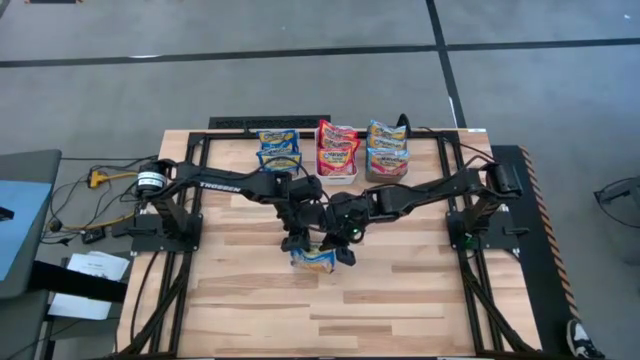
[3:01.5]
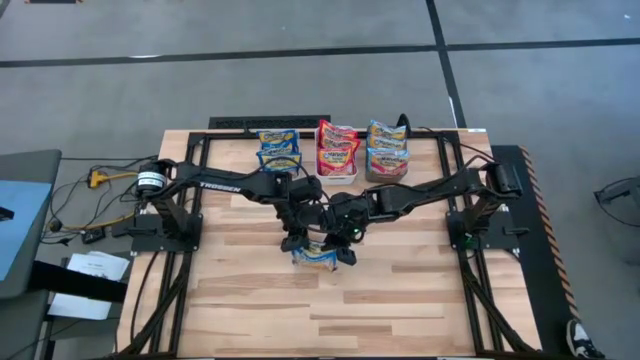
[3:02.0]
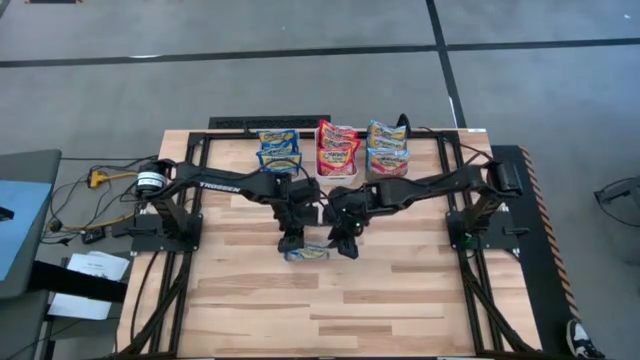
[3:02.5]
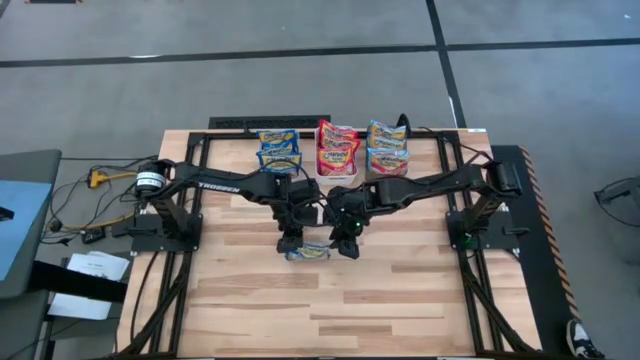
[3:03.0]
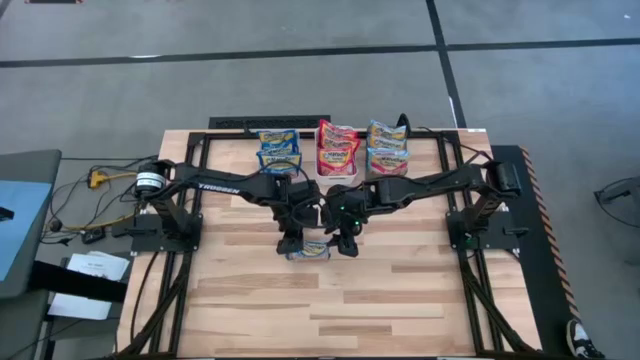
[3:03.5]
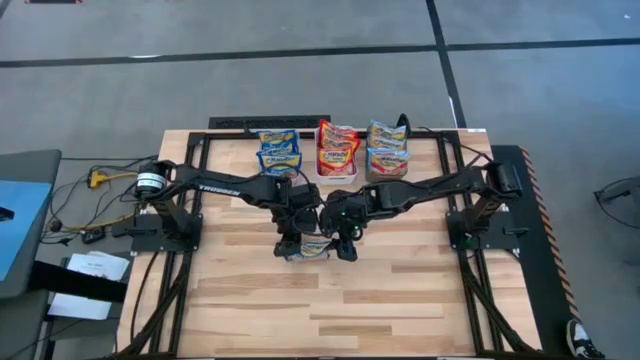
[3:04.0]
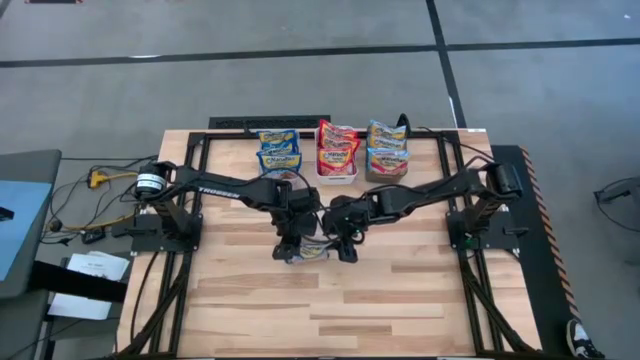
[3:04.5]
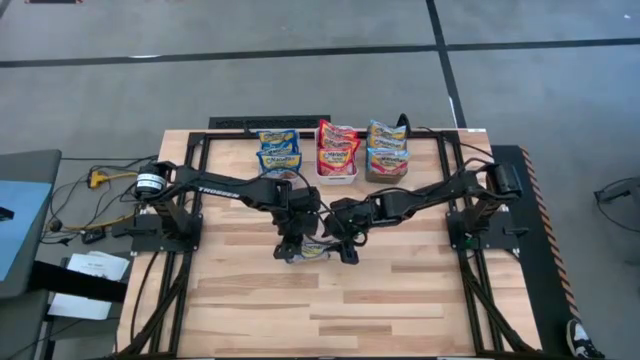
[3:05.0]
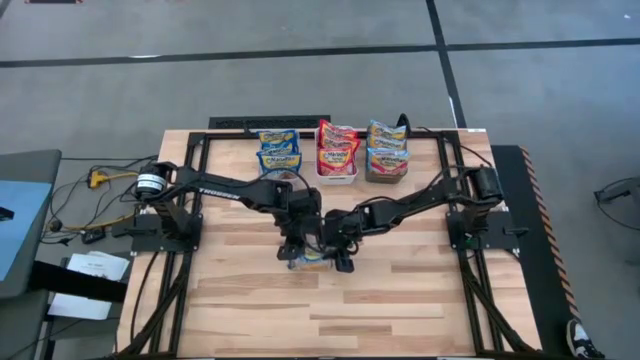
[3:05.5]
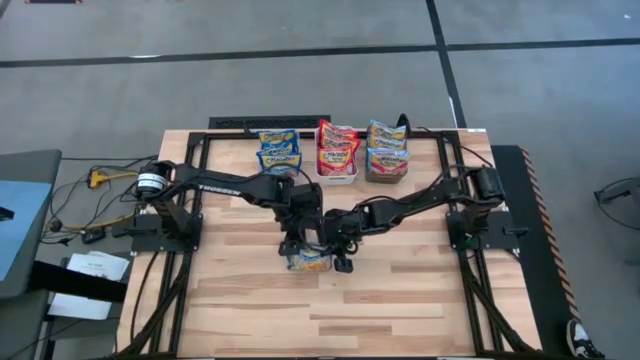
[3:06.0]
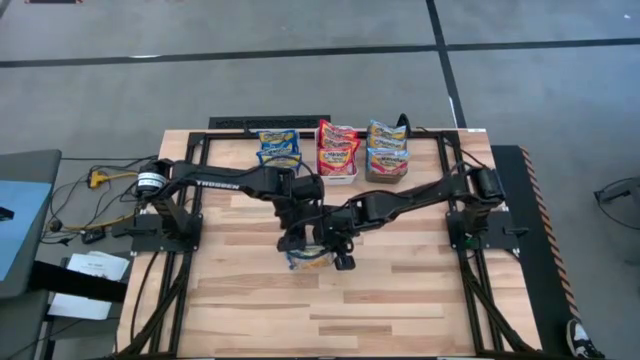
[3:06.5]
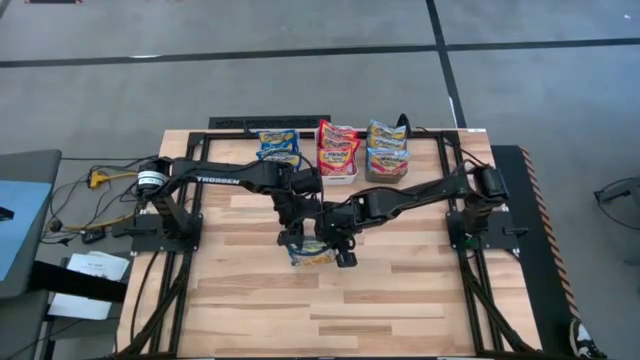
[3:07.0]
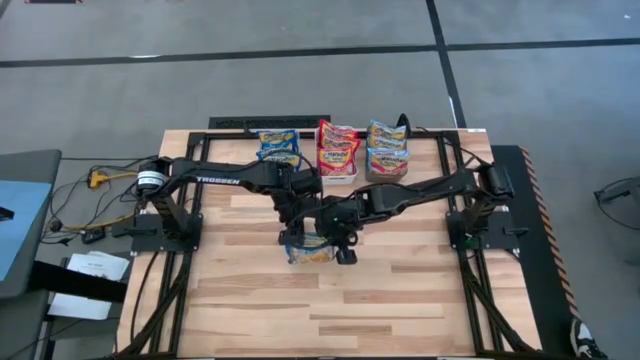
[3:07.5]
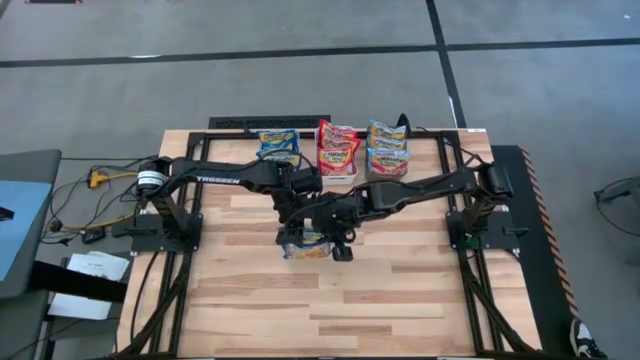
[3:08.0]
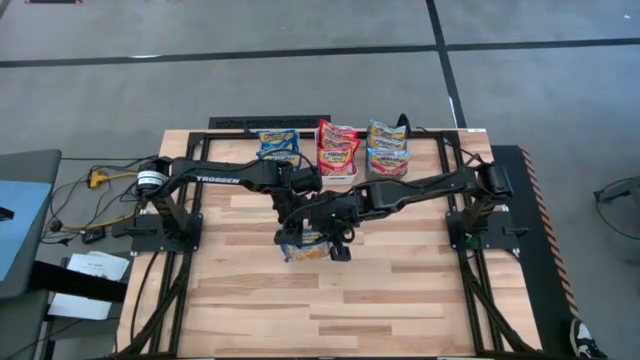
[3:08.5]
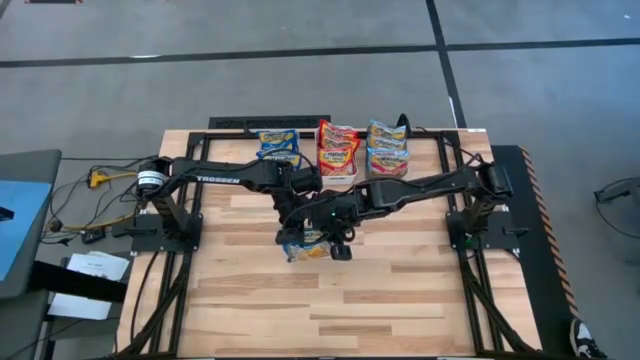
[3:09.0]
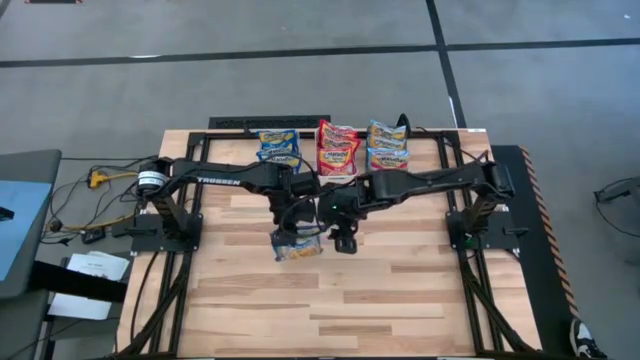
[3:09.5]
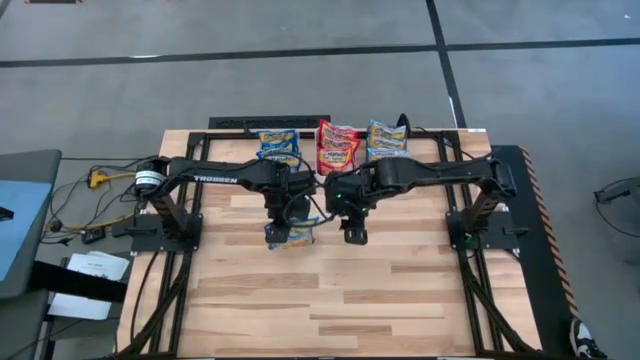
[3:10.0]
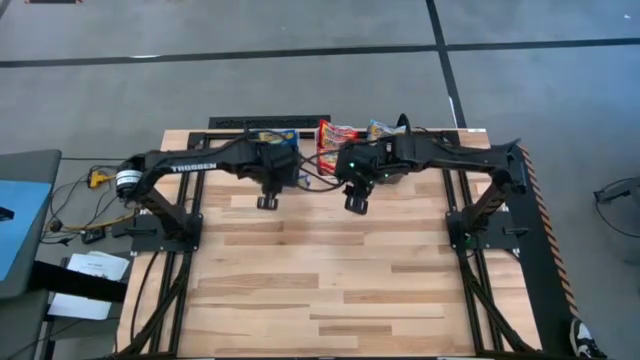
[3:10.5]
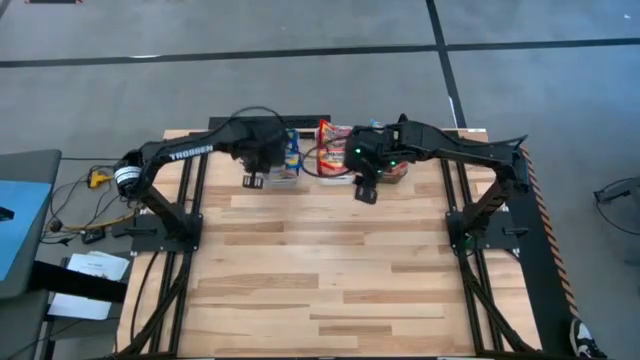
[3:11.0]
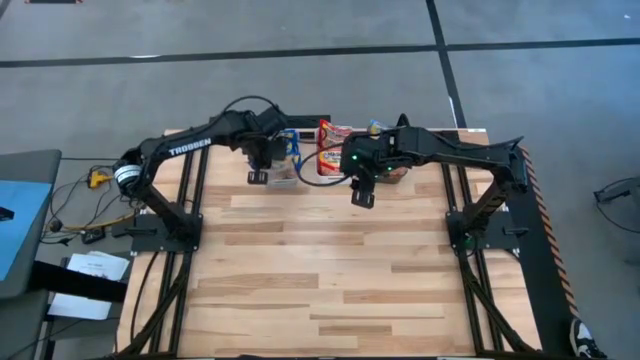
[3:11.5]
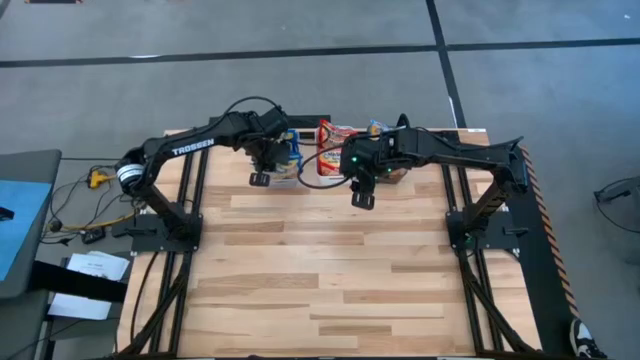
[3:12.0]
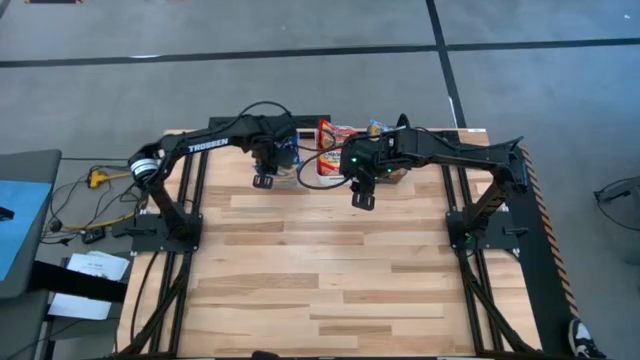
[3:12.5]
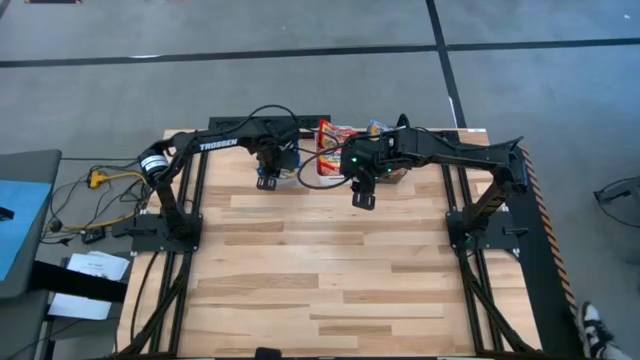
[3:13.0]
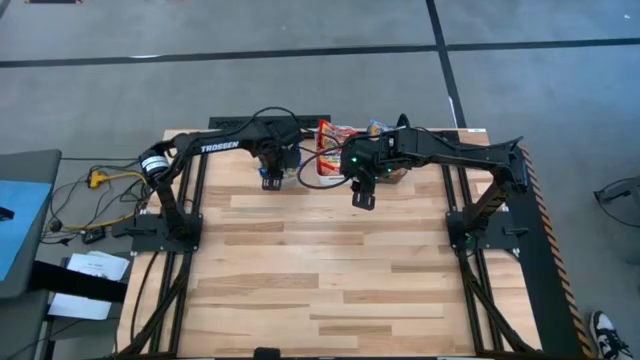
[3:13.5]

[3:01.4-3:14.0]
Task: Sort Maruchan noodles
Put the blue noodle pack into the transparent bin

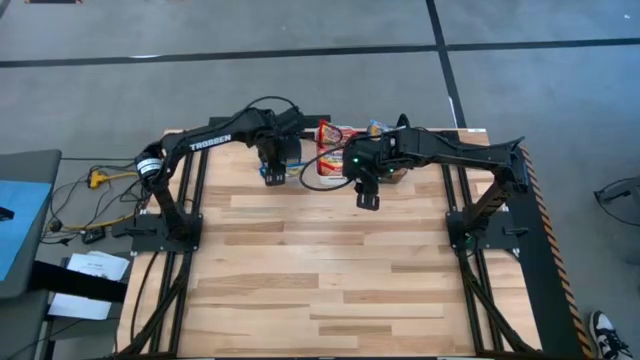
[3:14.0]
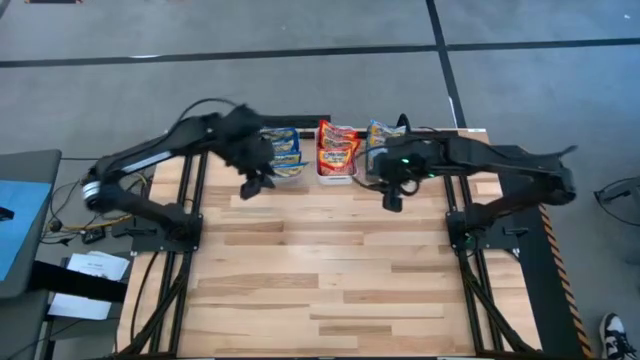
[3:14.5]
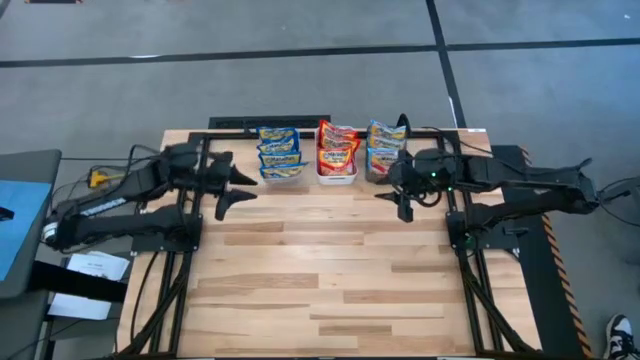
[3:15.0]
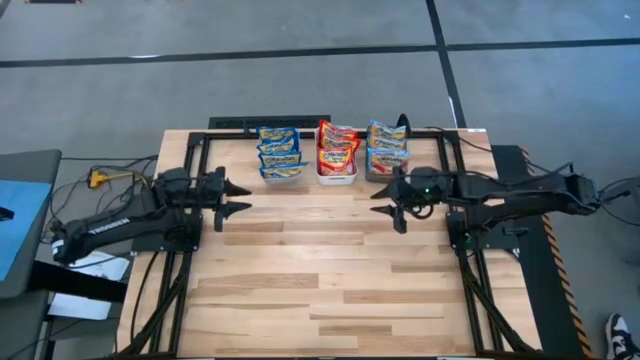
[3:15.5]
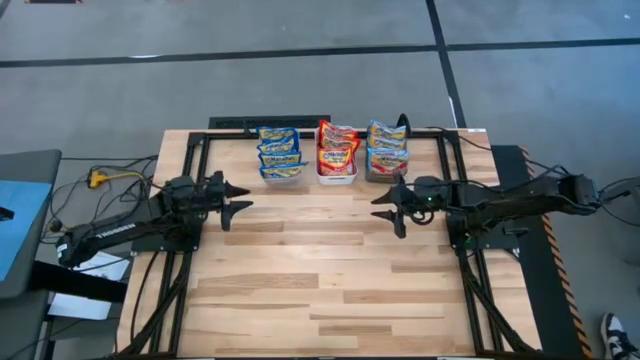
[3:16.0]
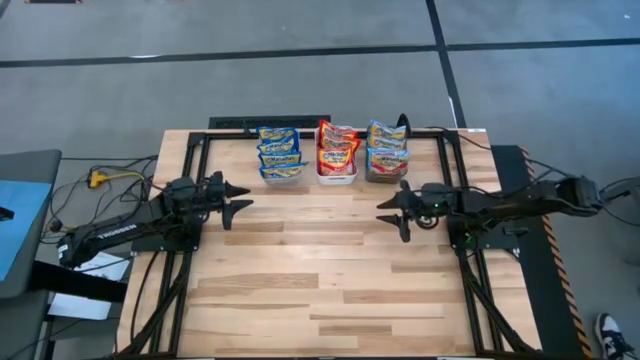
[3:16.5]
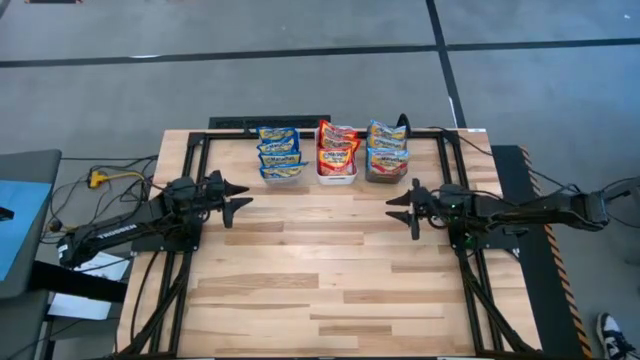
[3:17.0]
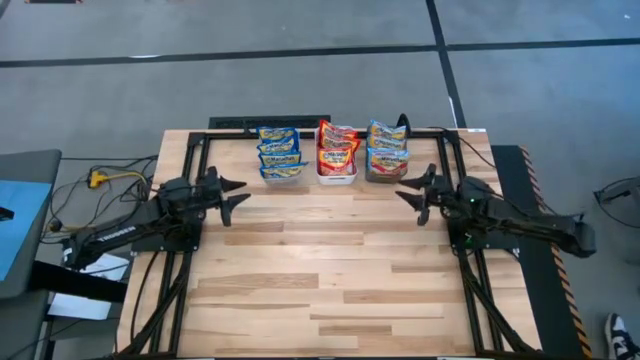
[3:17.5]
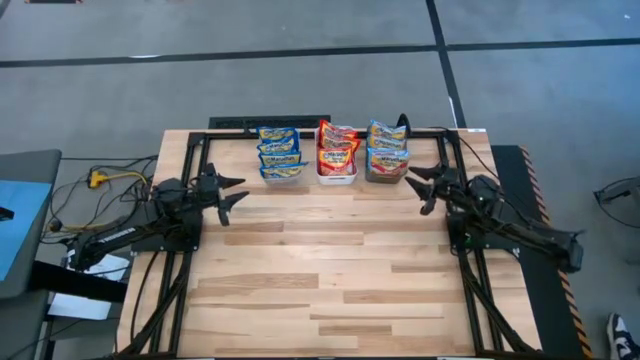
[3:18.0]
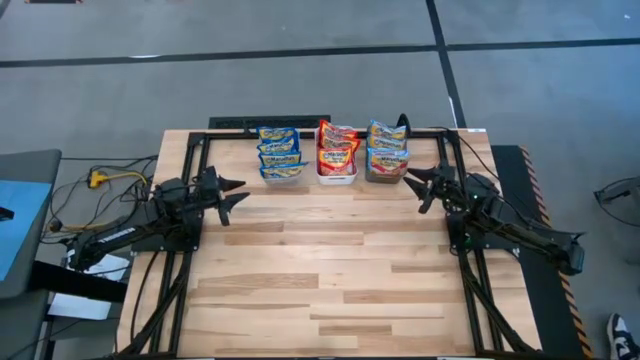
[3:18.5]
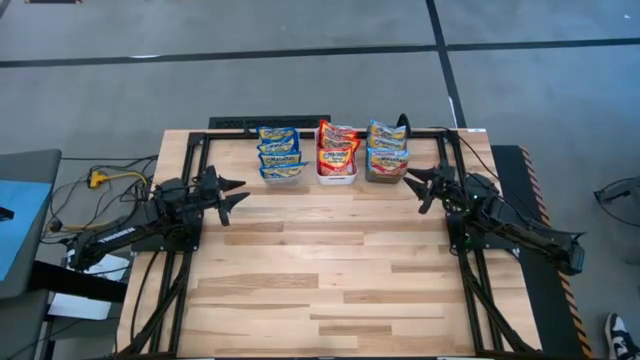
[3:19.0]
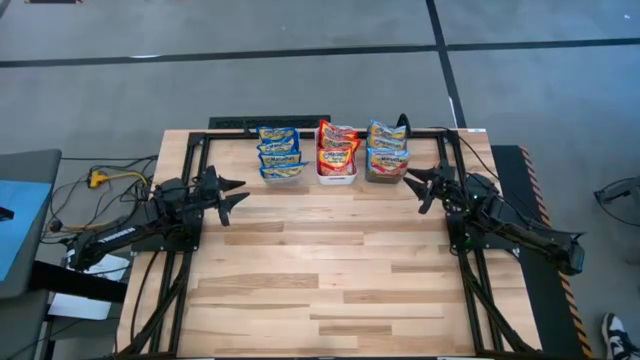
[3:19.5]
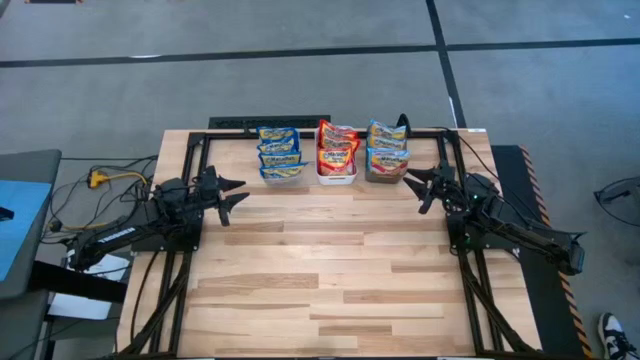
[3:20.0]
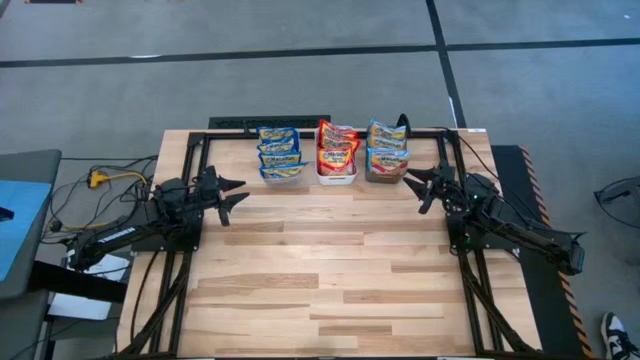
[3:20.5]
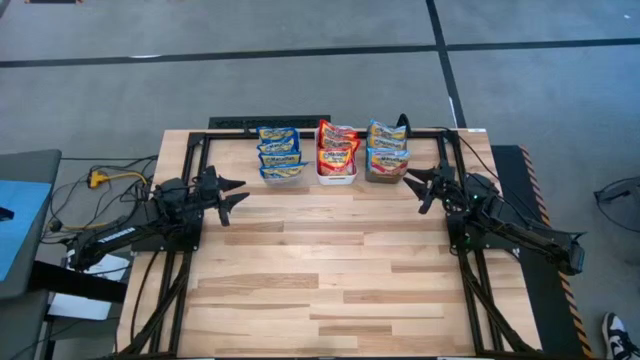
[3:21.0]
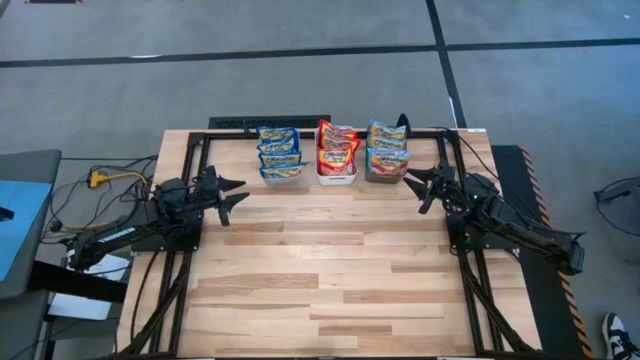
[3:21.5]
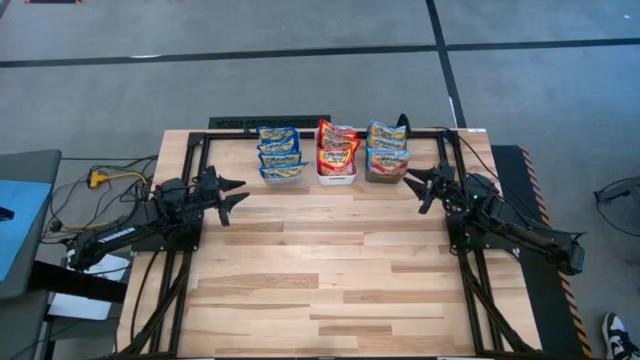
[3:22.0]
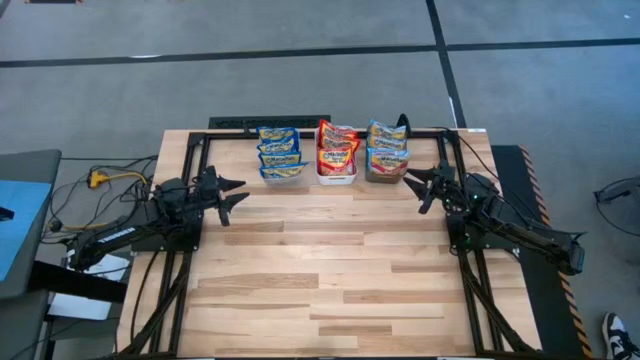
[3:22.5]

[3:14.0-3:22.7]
Return to Home Position
